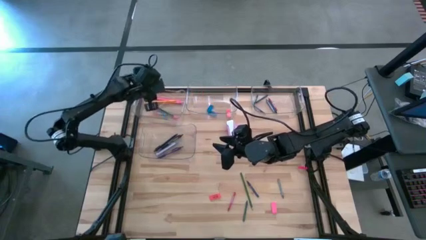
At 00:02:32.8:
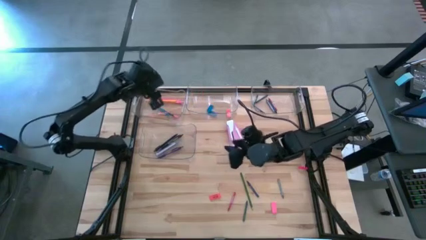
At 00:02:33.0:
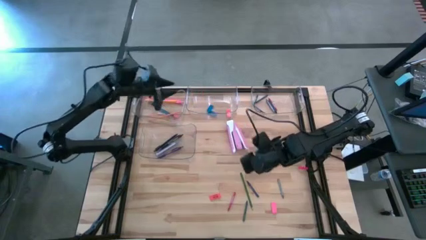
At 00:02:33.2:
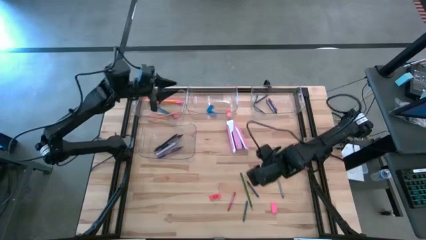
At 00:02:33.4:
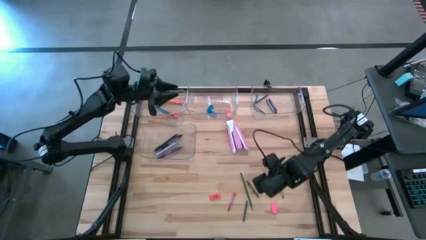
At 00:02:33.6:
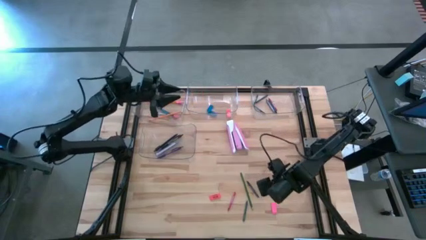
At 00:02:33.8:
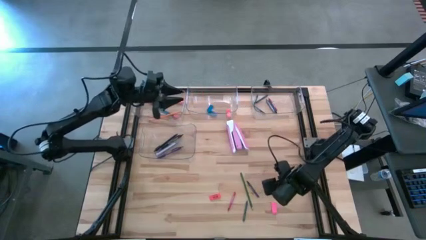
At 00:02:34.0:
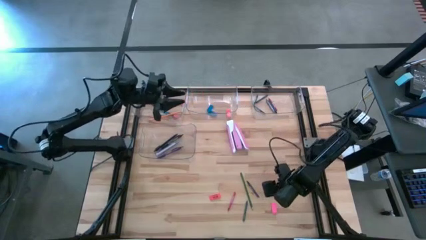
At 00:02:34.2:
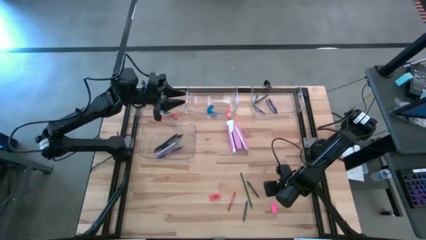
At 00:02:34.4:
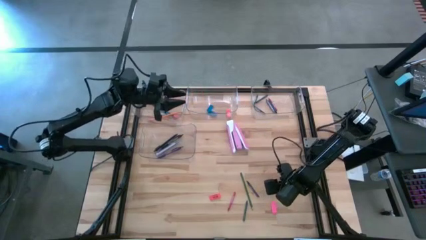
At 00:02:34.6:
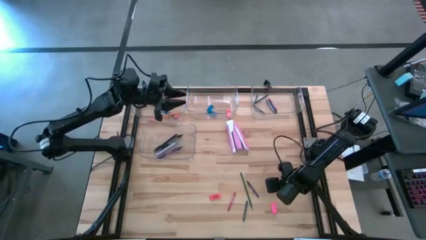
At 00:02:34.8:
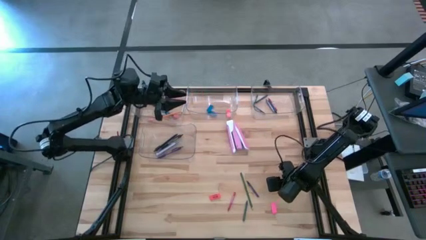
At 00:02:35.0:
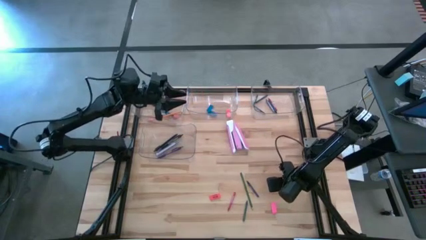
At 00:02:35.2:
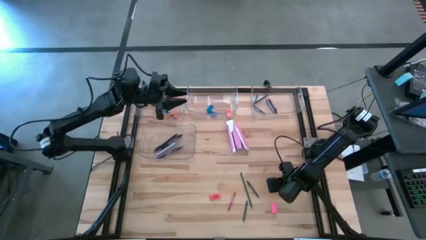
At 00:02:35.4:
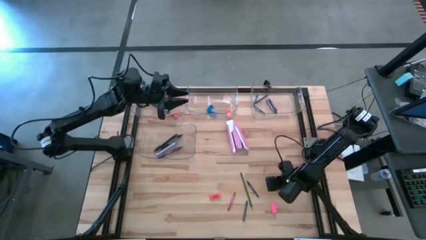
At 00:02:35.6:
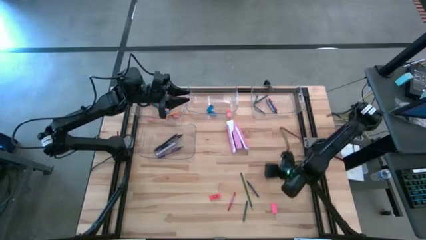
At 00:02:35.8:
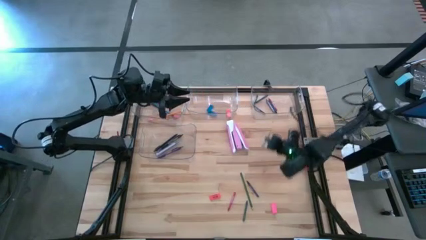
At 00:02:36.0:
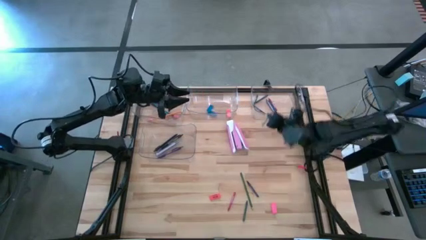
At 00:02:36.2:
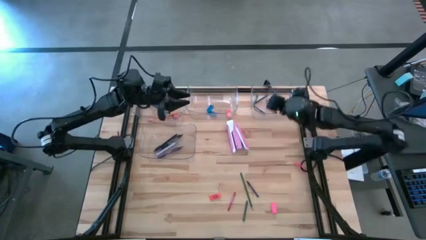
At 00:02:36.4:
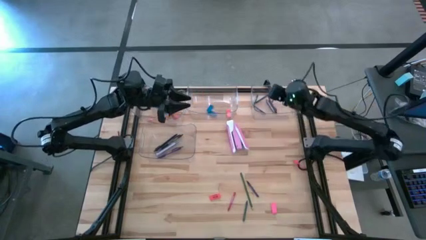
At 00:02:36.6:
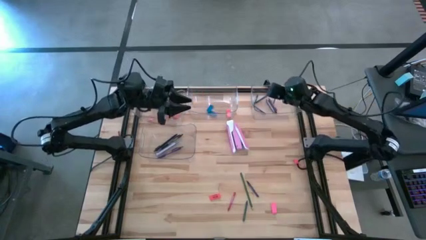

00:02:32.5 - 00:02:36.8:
Task: Sort crayons/erasers/pens/pencils in bins
Put the gray crayon into the top right transparent bin

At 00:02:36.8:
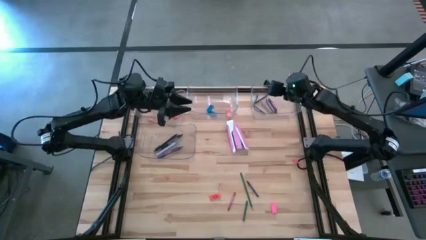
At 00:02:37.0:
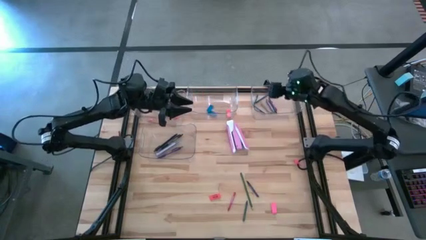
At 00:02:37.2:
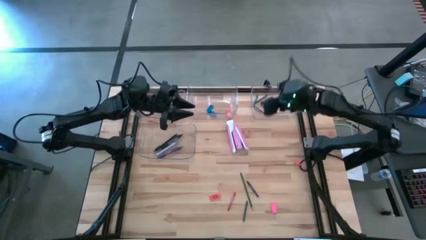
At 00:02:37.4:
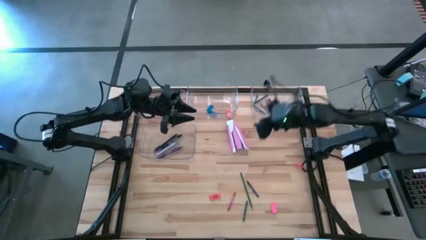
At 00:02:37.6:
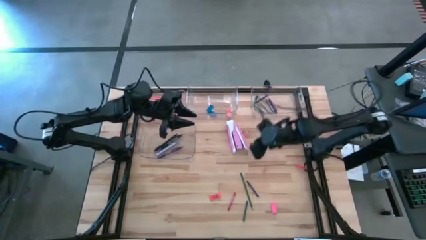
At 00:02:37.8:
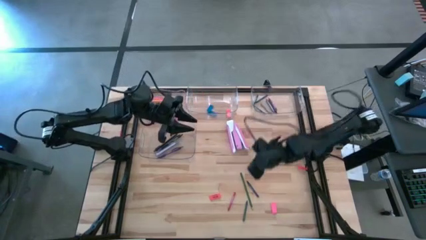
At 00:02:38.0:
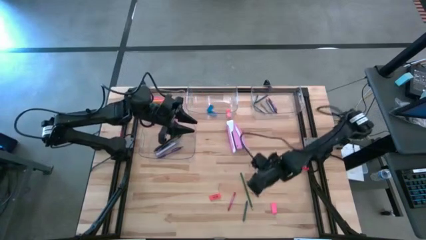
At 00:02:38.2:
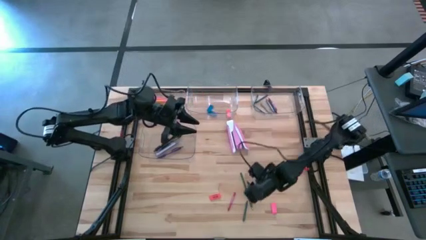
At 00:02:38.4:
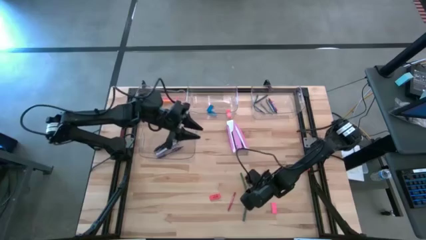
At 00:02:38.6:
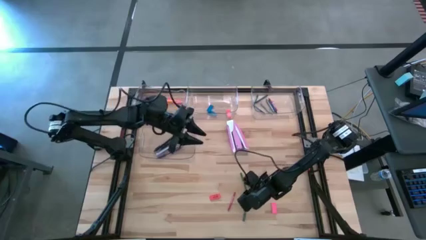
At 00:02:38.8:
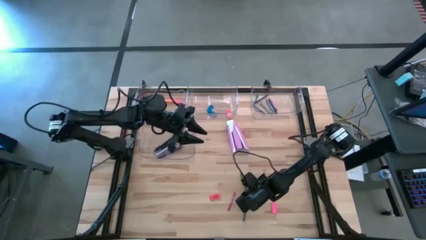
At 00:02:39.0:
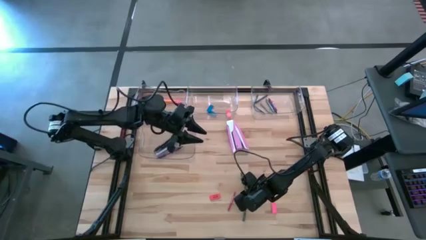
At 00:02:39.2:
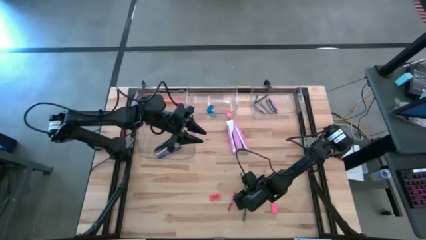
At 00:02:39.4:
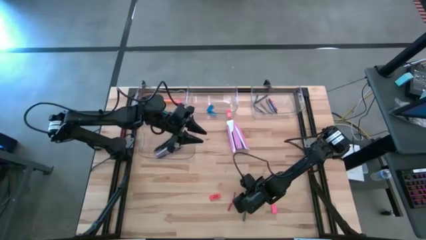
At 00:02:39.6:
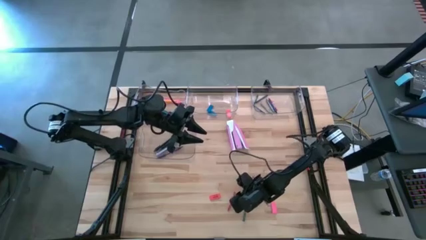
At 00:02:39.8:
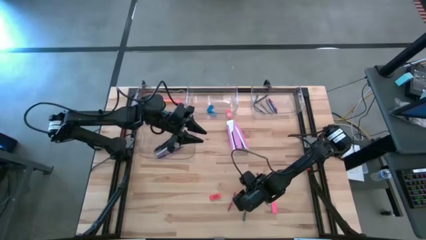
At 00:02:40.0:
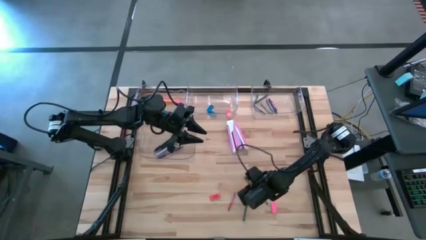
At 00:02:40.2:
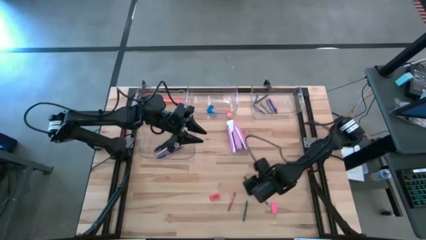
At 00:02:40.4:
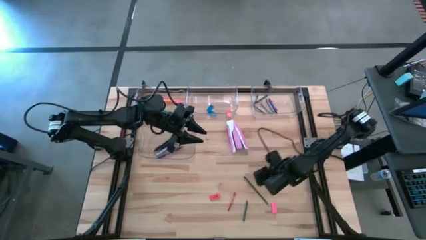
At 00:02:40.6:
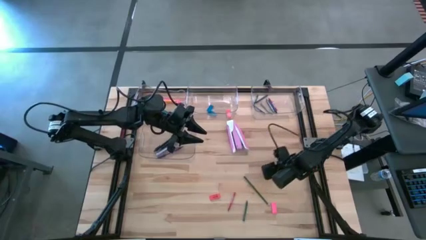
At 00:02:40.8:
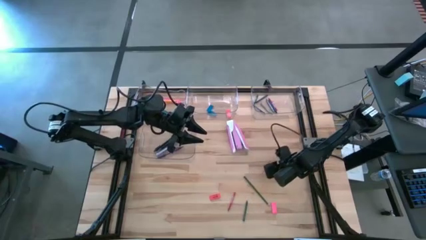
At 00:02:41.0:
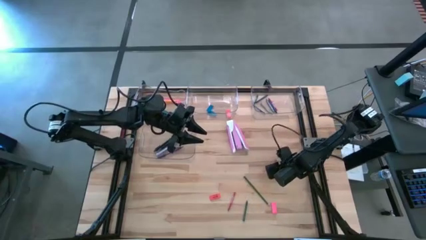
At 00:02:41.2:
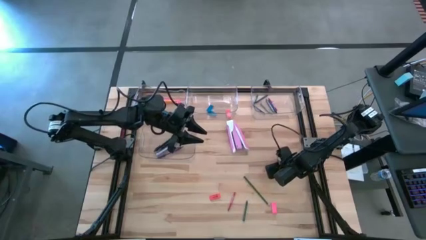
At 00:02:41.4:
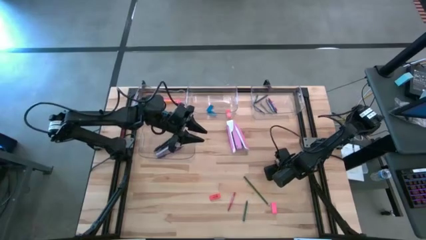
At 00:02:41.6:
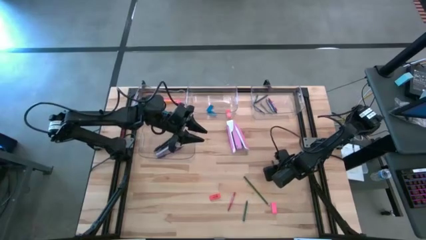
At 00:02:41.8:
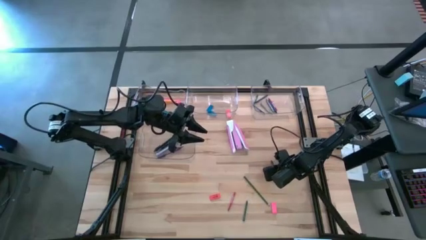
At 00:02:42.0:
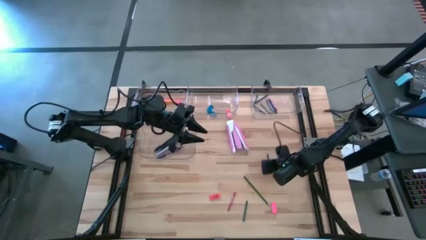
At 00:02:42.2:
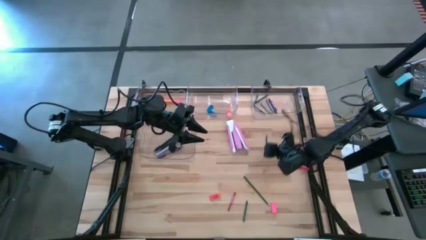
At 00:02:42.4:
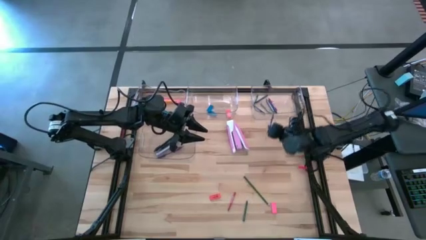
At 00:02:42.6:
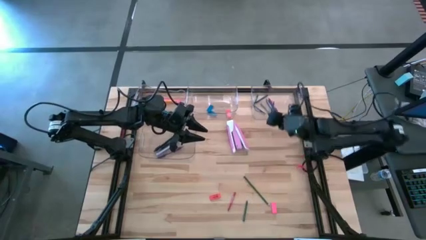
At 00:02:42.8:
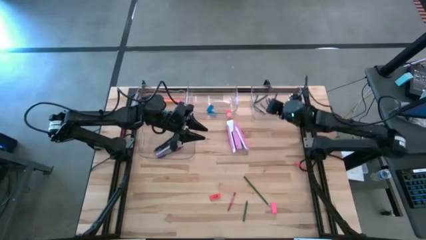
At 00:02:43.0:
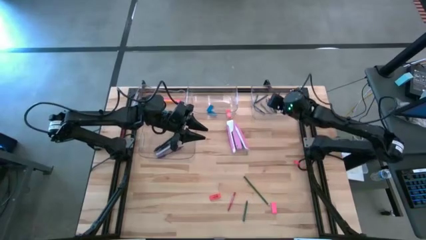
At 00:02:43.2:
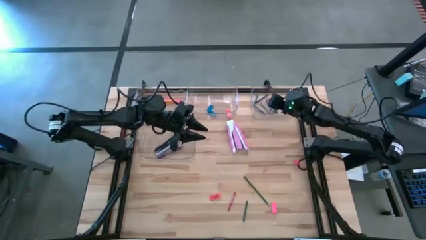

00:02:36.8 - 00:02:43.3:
Put the blue crayon into the top right transparent bin

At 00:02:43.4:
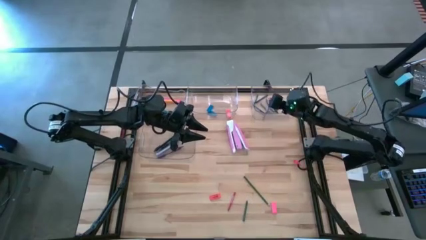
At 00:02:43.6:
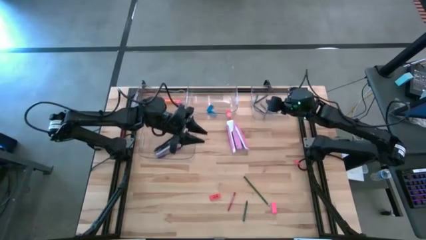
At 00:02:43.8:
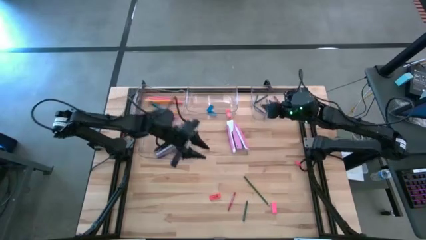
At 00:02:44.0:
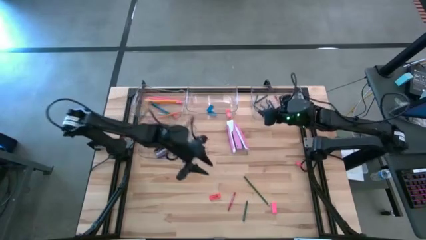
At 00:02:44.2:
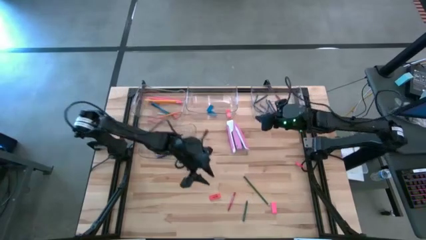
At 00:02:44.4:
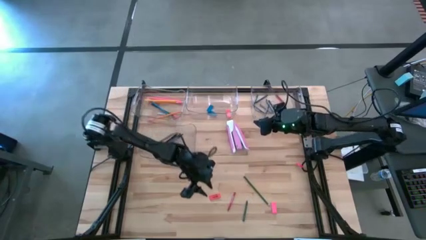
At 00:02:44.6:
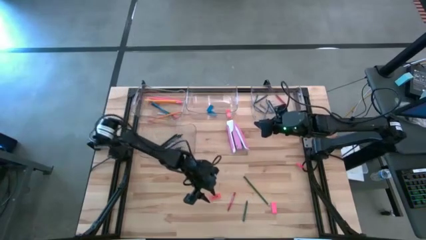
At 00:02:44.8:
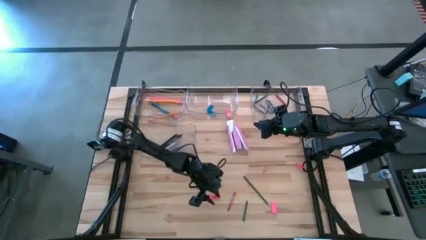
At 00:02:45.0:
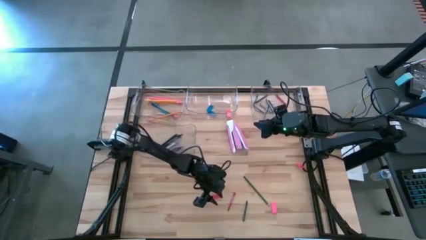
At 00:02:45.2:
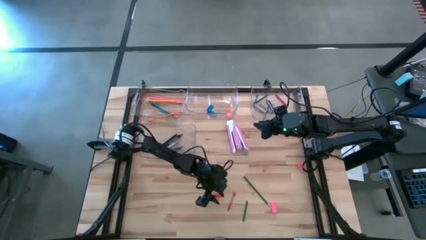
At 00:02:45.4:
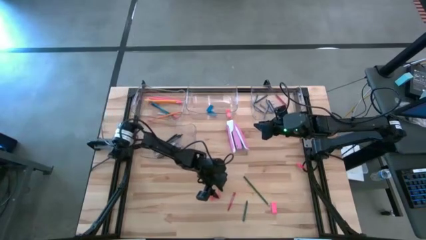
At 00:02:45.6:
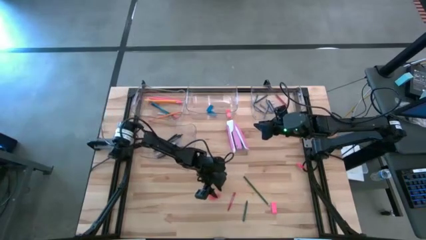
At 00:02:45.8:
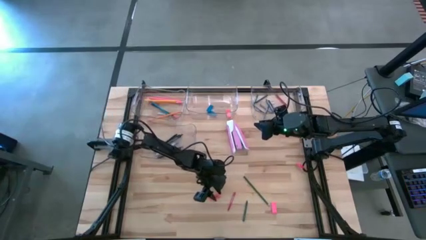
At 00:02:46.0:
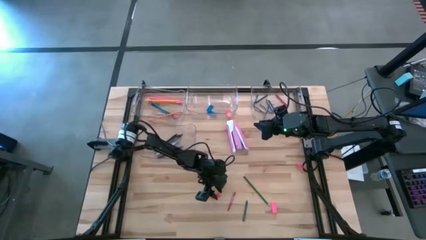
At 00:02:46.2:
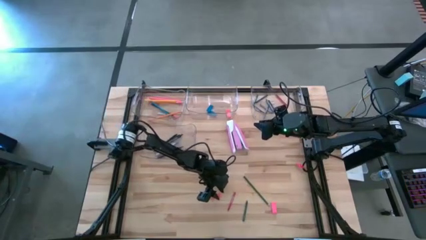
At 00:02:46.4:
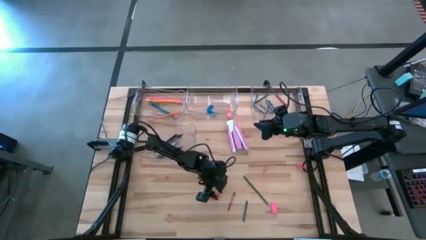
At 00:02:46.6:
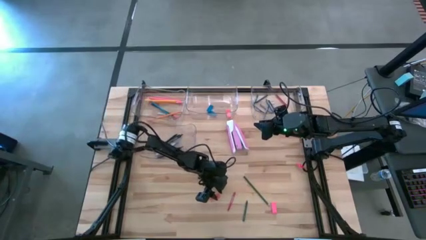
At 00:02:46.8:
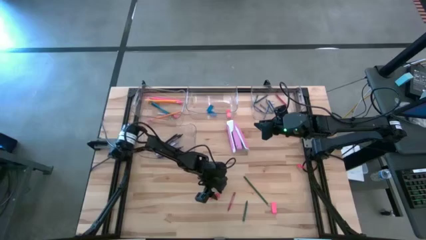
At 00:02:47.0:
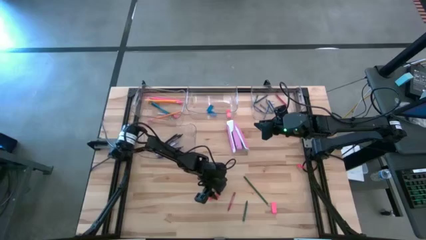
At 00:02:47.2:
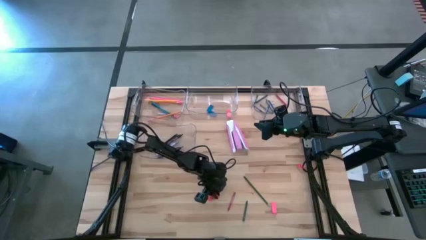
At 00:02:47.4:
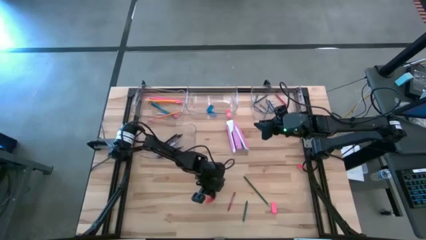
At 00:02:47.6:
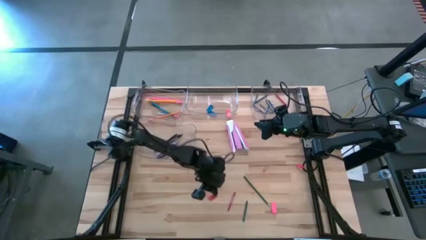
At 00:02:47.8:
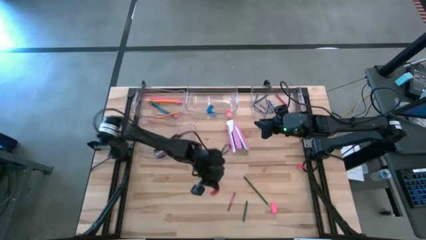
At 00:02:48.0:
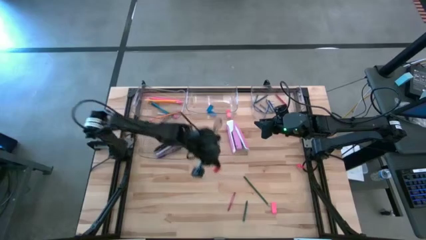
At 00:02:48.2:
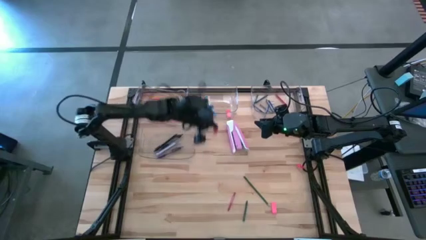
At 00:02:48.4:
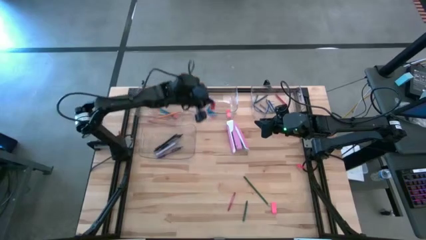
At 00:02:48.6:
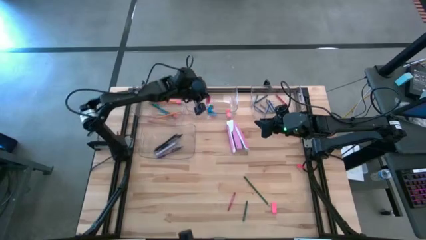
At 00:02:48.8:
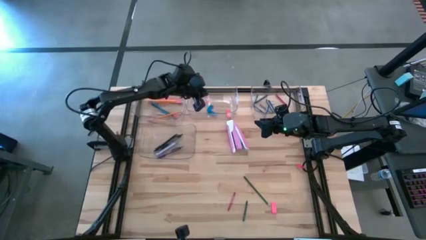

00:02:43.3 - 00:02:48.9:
Put the orange eraser into the middle transparent bin
